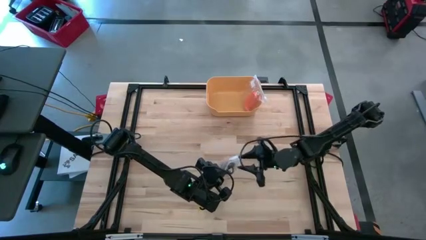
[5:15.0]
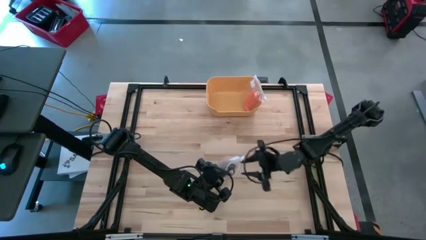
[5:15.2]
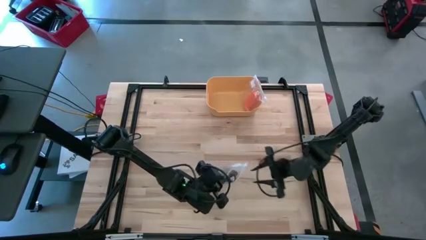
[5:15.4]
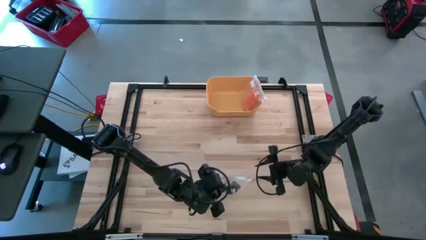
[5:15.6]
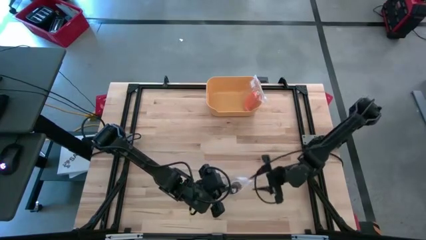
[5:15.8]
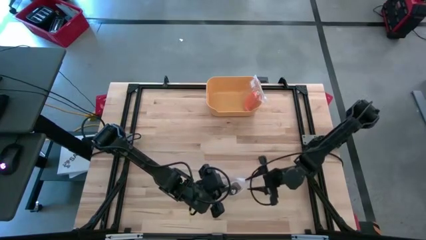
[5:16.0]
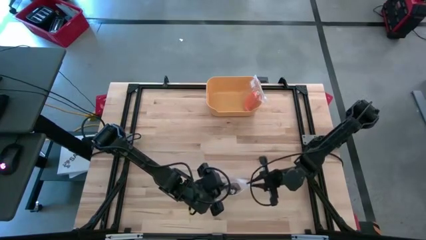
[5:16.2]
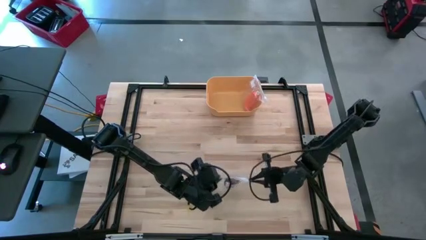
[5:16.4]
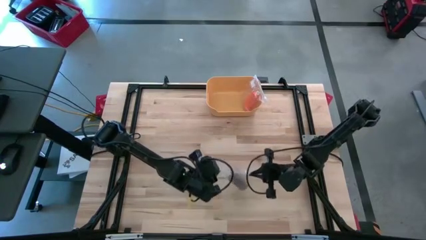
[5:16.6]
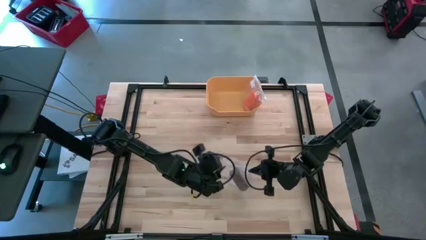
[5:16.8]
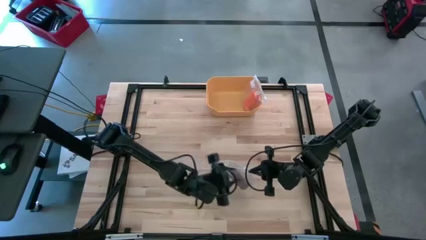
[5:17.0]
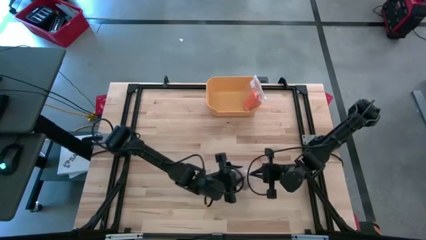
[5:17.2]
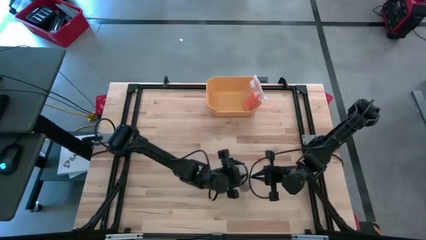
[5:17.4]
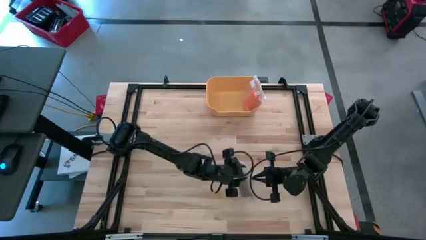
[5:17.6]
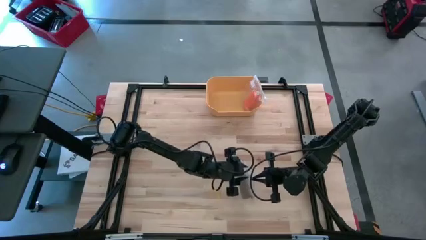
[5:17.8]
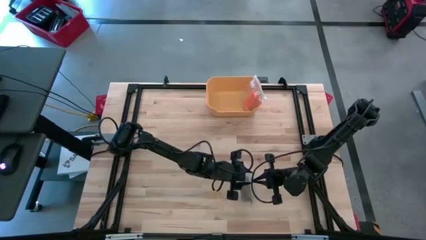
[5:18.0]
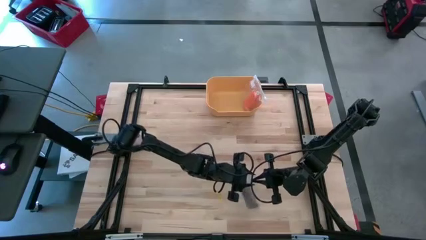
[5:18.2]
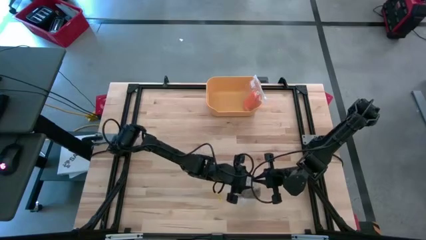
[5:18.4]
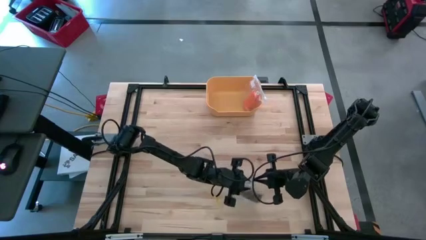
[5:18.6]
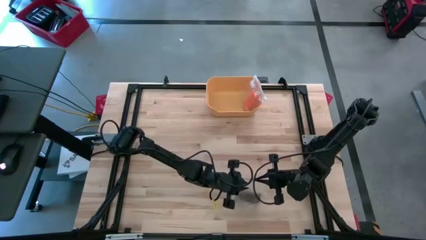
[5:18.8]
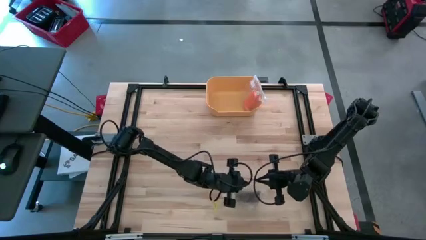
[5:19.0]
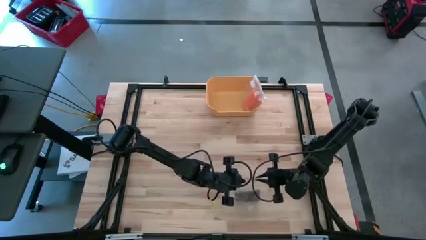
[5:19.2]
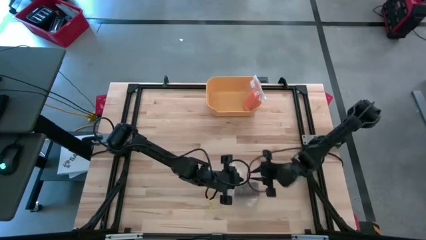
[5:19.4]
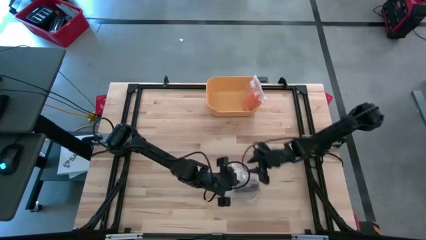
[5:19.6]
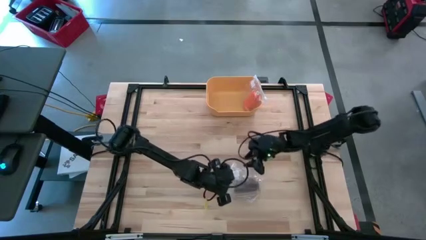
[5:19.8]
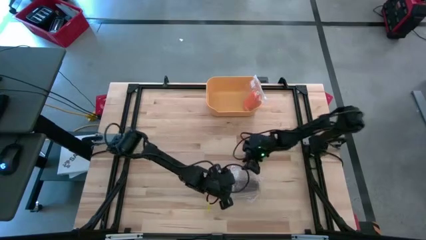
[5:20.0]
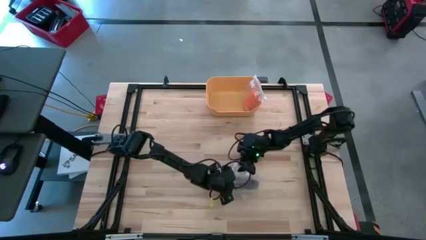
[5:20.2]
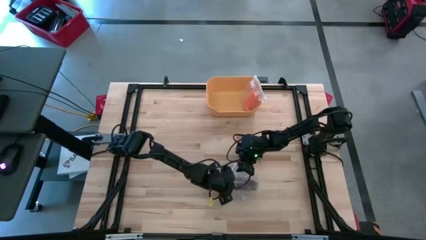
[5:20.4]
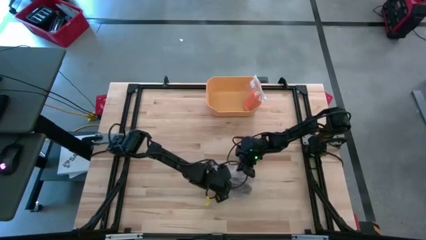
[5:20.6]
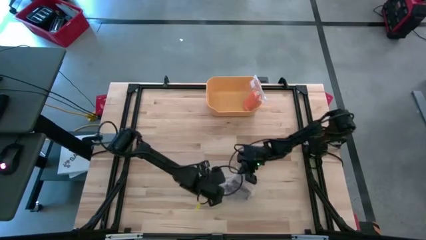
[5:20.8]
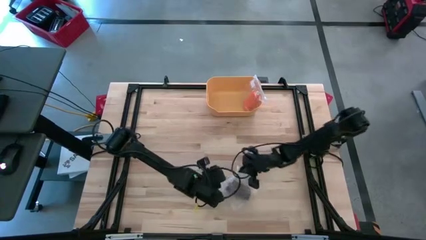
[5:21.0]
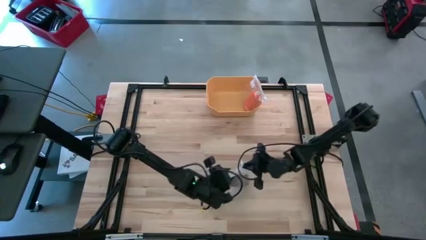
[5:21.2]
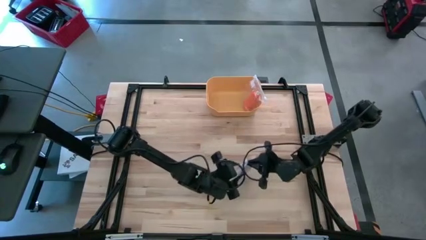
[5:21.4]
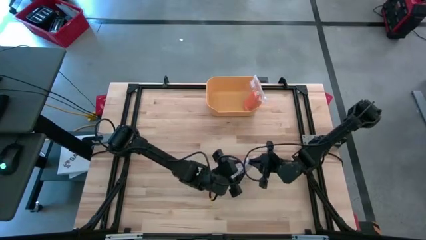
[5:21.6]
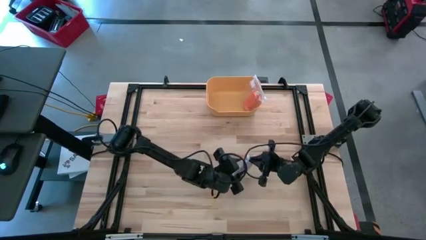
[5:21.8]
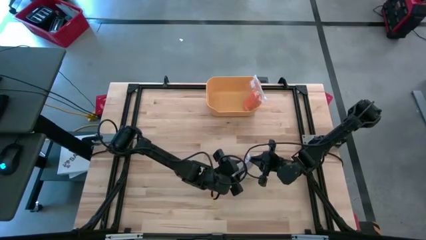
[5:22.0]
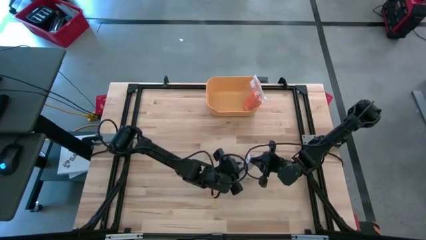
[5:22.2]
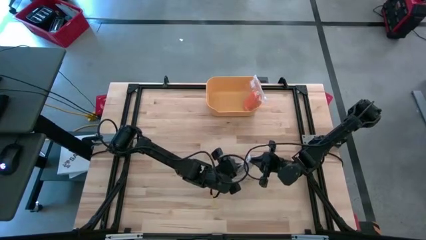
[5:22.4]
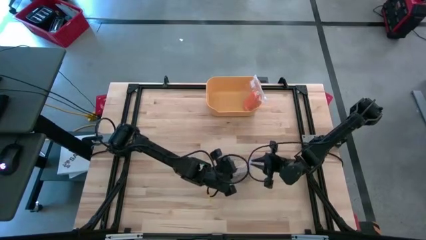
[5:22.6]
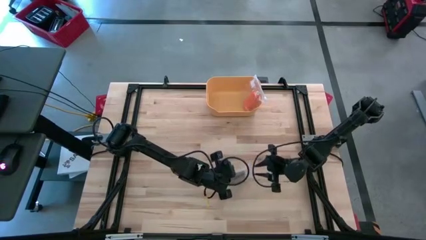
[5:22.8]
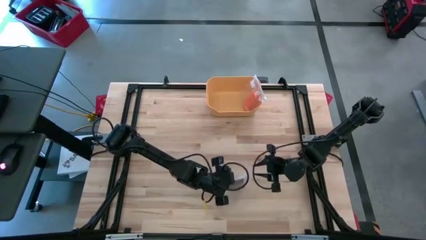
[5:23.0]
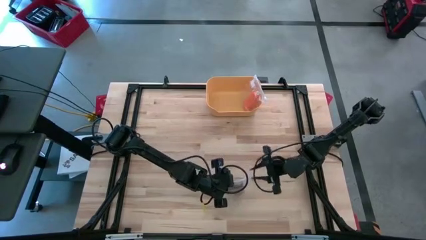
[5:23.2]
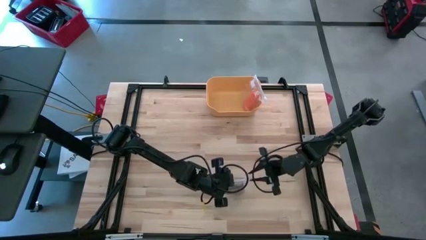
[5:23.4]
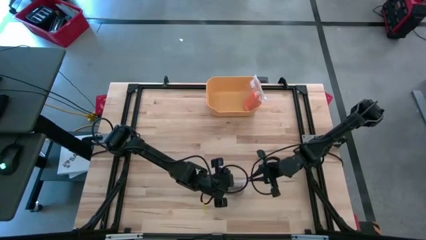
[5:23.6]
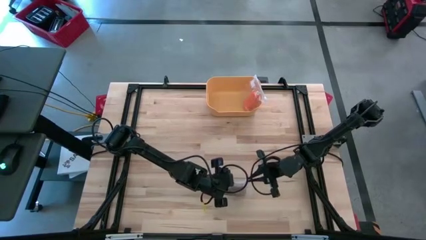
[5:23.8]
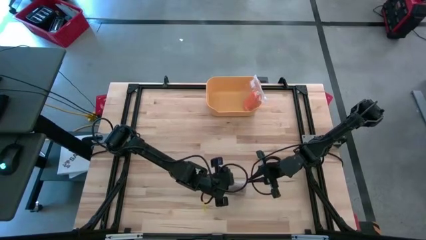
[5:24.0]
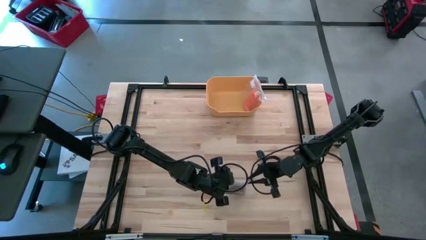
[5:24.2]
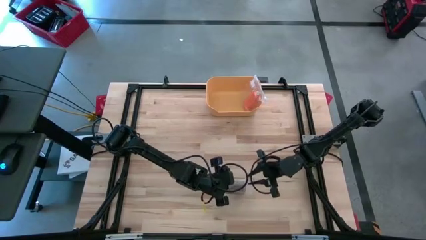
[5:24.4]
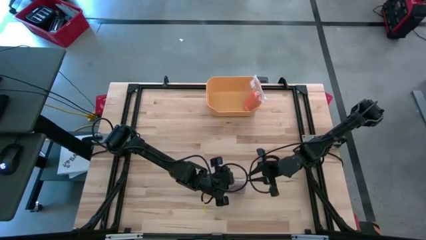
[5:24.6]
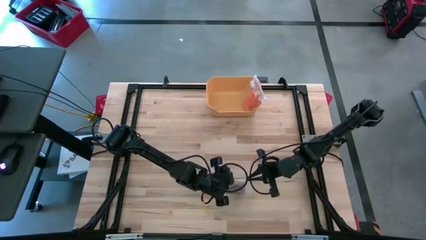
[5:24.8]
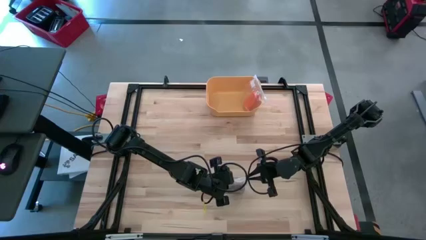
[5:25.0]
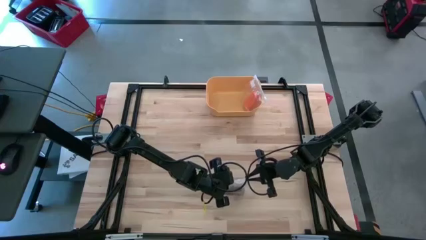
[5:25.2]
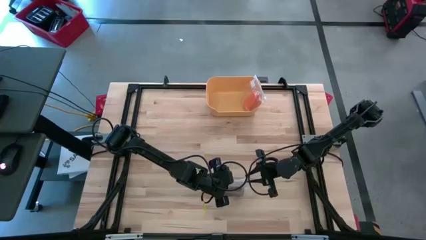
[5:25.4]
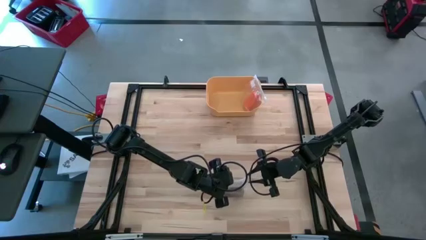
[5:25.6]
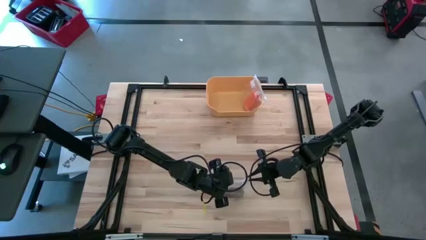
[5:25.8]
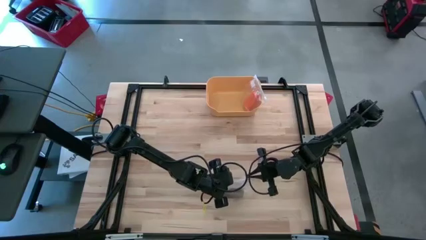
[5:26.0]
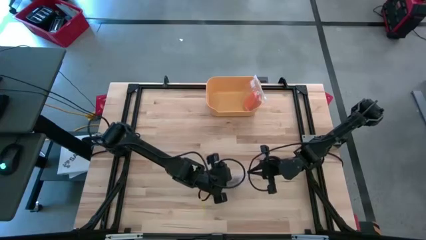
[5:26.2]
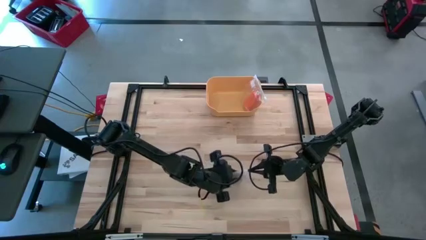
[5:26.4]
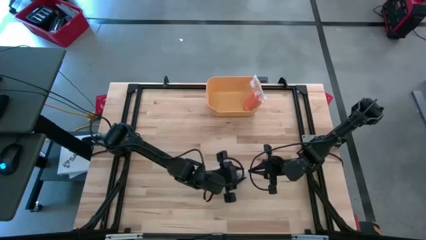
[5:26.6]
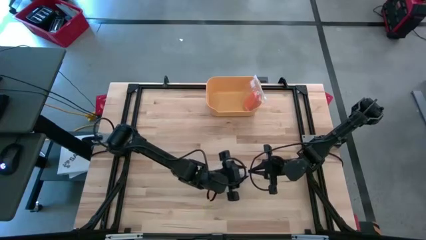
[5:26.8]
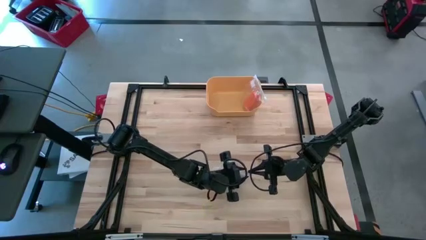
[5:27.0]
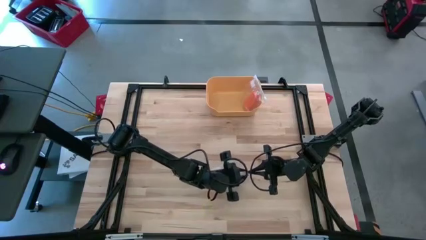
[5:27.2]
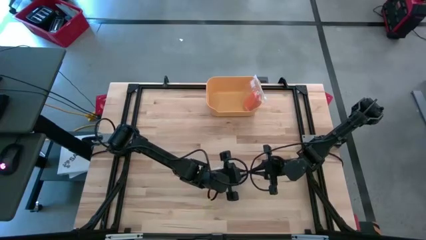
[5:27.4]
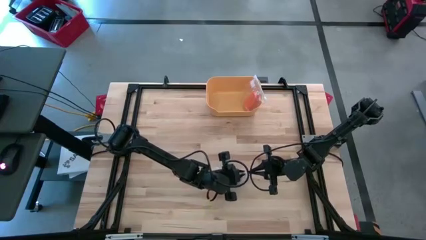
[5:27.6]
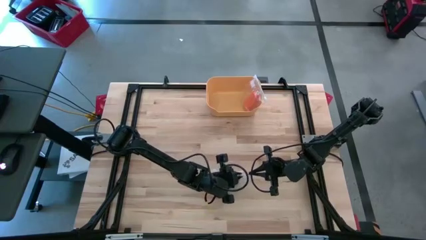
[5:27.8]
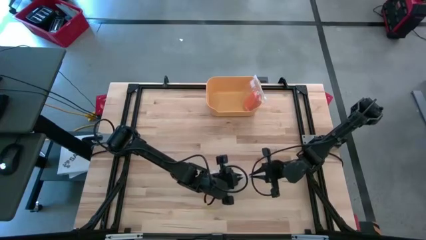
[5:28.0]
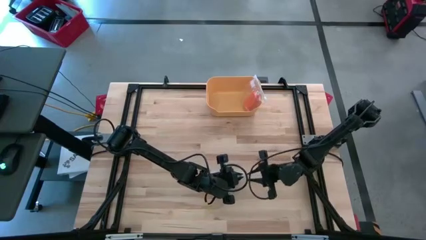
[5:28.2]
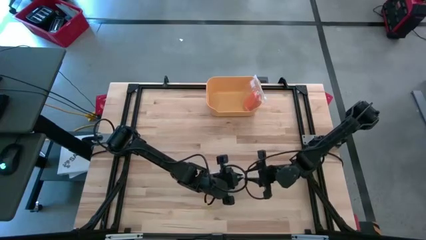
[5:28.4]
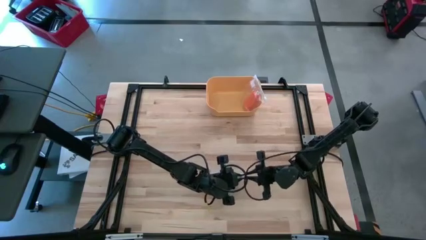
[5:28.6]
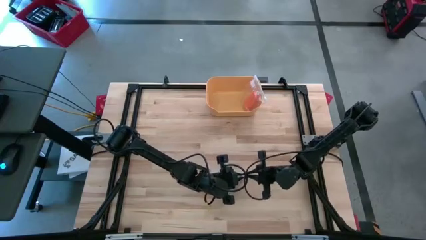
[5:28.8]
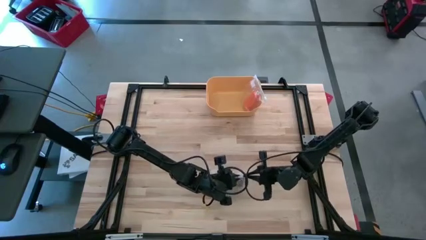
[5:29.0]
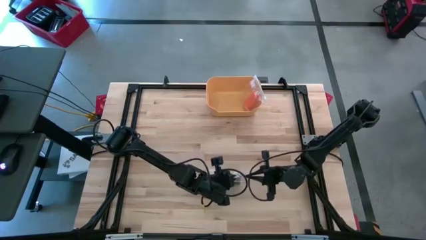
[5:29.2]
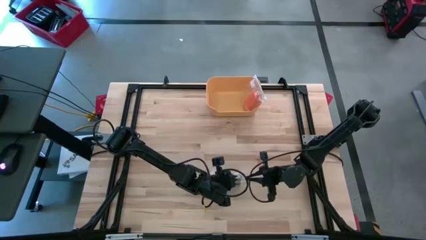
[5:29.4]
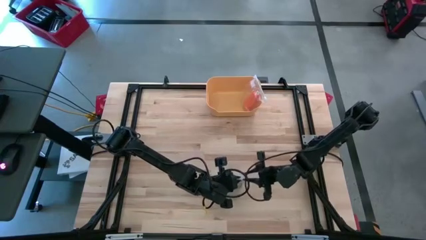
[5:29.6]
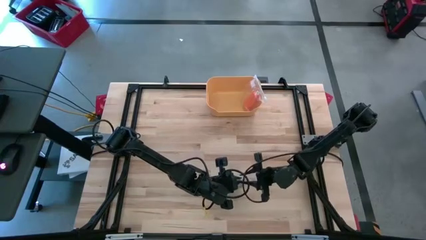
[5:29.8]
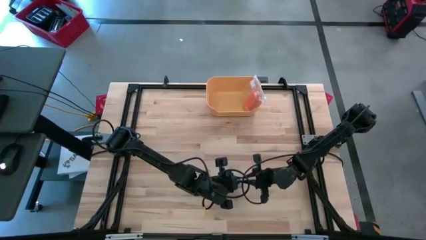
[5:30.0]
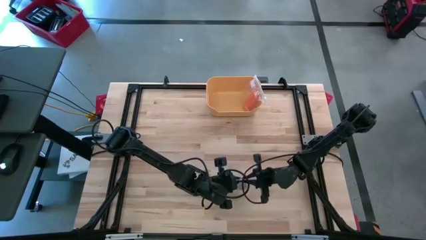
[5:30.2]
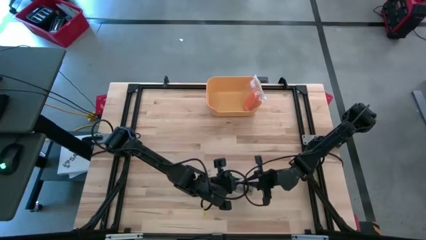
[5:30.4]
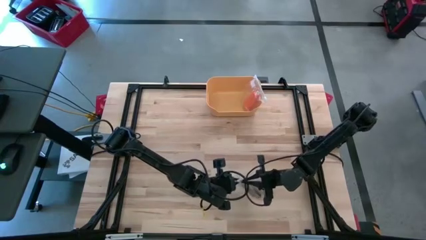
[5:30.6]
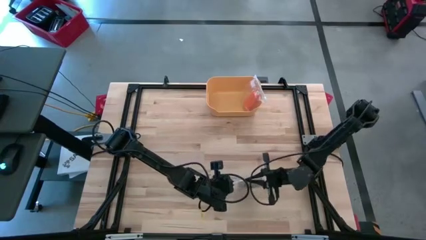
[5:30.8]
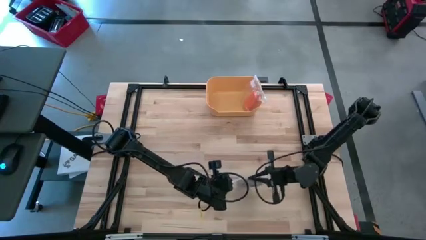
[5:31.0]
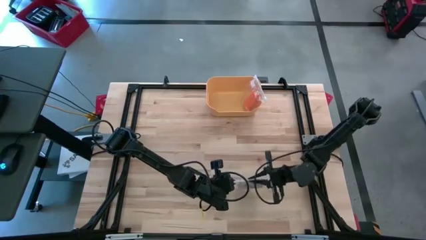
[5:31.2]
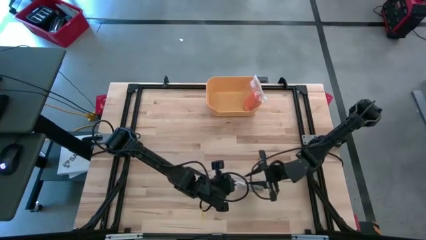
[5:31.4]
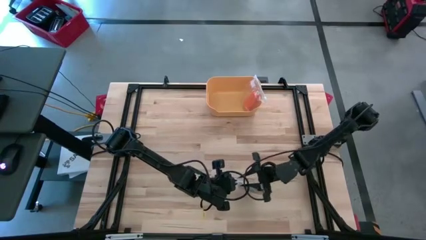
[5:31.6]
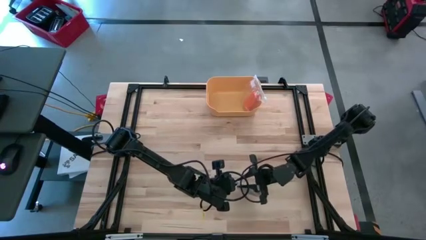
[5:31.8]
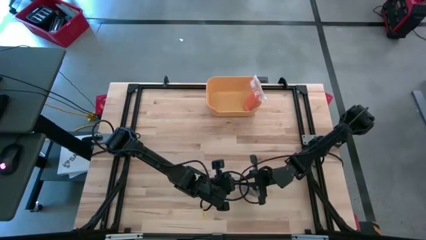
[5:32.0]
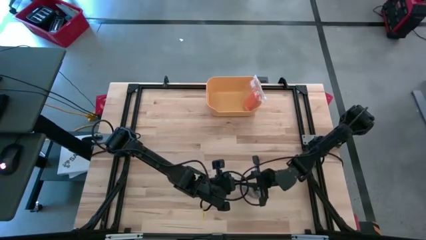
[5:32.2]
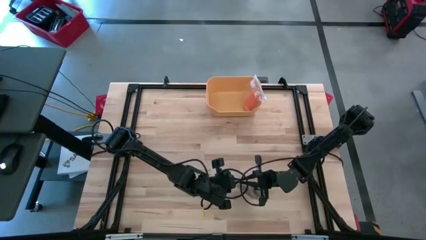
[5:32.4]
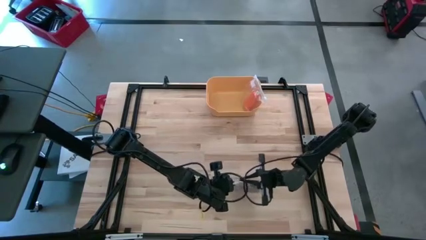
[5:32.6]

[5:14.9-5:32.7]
Task: Roll bandage
Close the transparent zip bag
